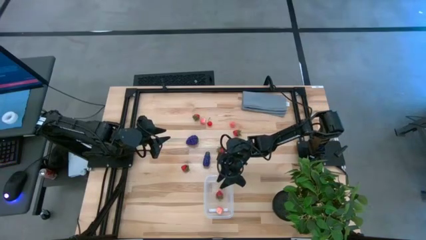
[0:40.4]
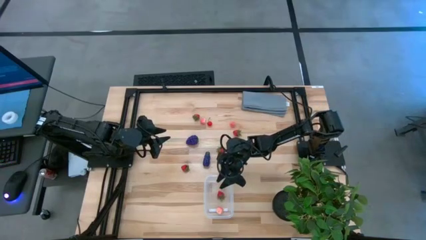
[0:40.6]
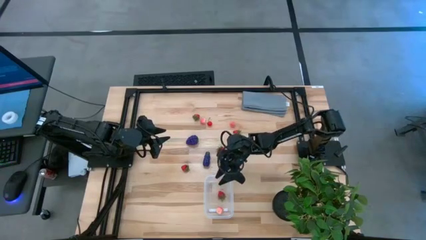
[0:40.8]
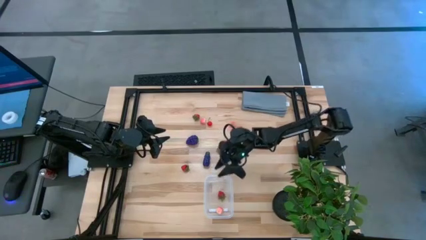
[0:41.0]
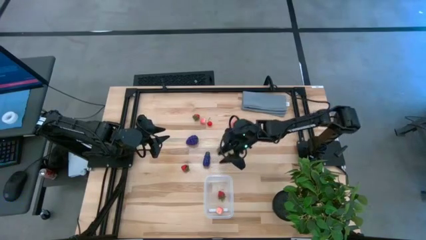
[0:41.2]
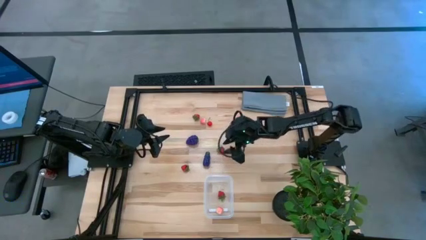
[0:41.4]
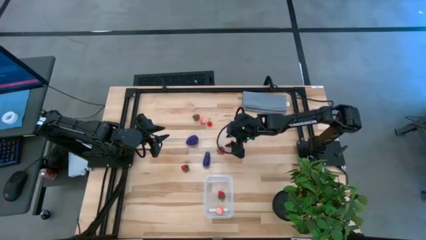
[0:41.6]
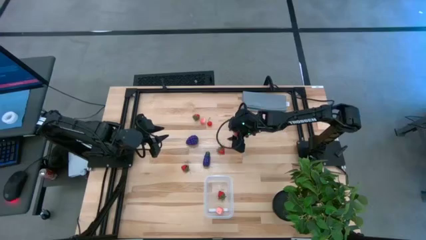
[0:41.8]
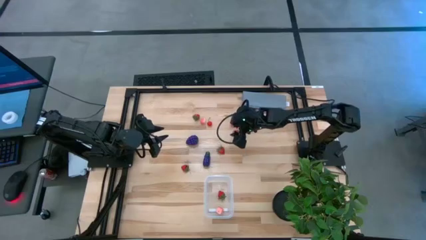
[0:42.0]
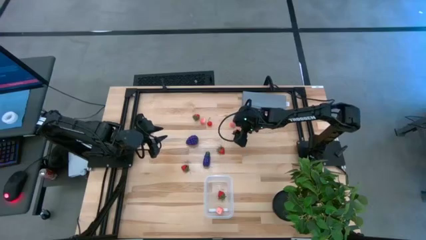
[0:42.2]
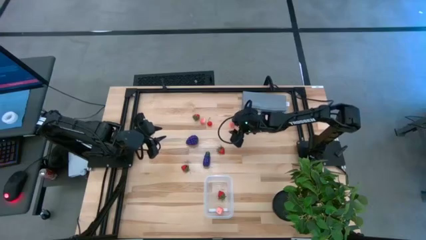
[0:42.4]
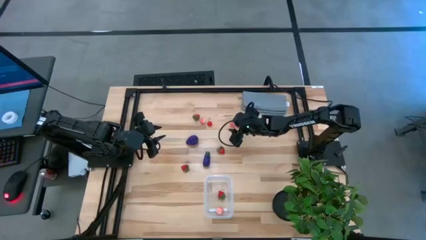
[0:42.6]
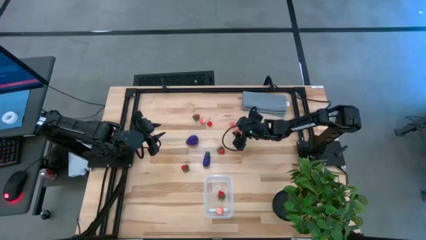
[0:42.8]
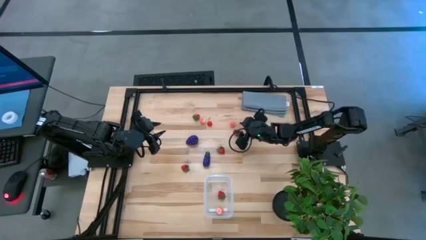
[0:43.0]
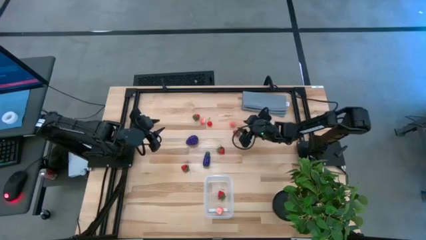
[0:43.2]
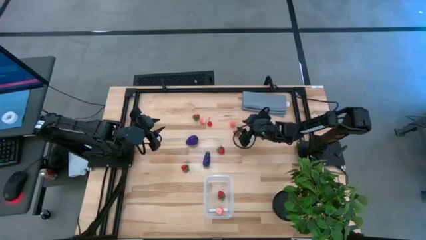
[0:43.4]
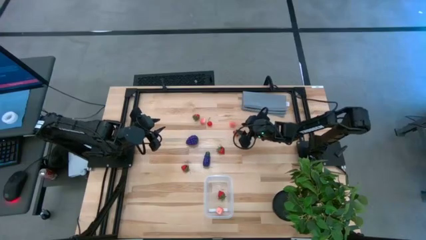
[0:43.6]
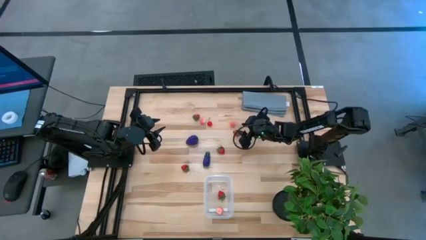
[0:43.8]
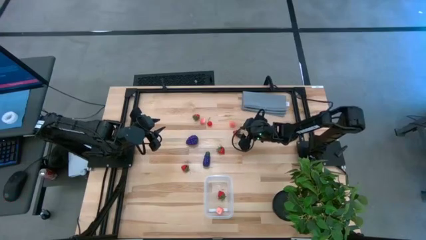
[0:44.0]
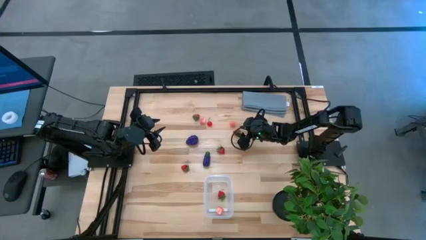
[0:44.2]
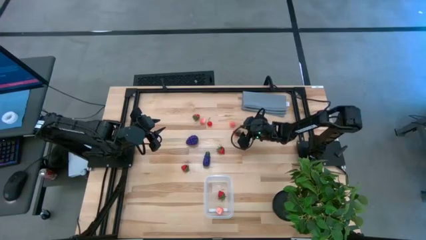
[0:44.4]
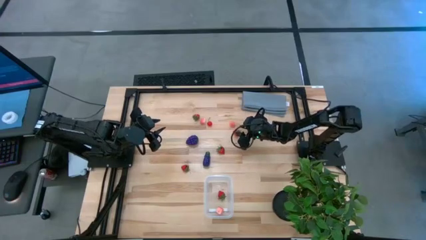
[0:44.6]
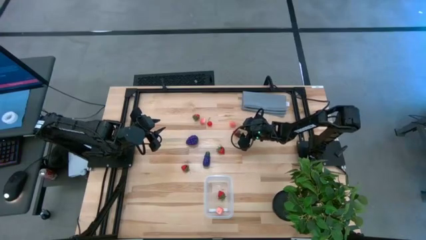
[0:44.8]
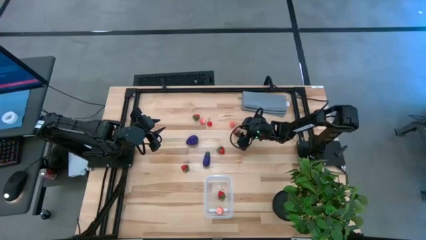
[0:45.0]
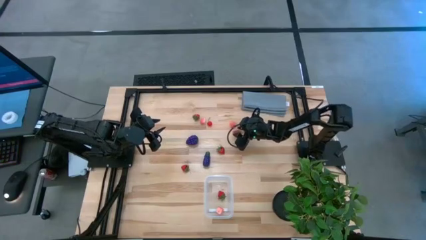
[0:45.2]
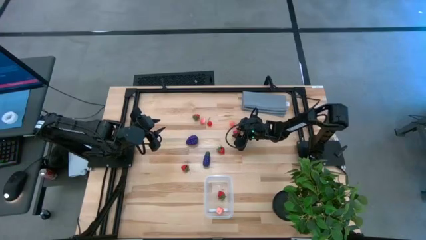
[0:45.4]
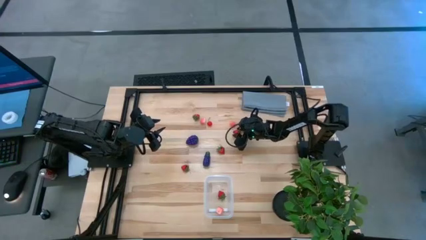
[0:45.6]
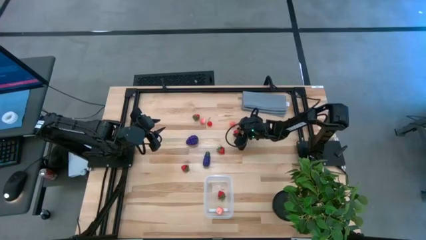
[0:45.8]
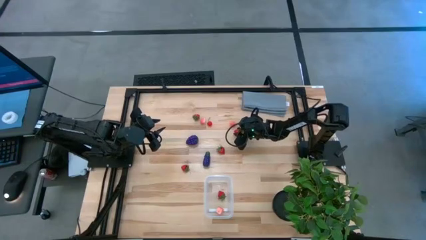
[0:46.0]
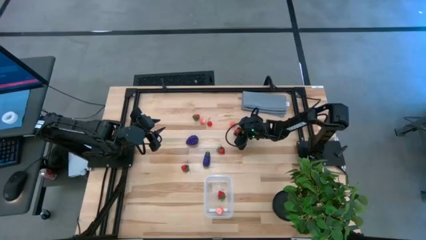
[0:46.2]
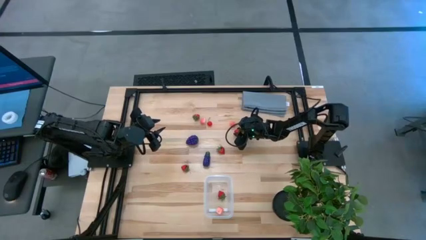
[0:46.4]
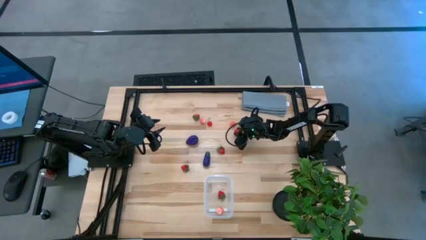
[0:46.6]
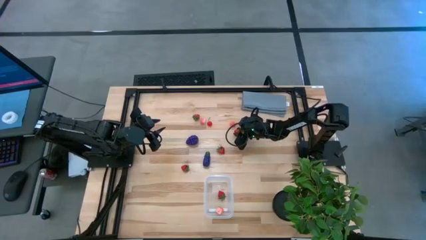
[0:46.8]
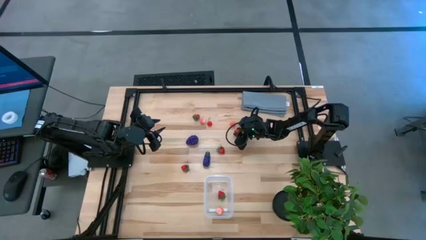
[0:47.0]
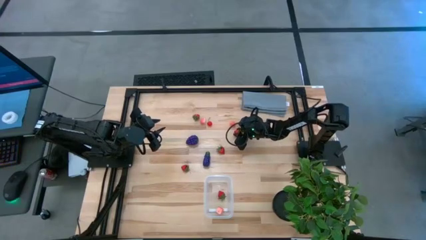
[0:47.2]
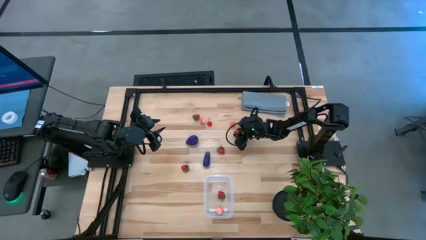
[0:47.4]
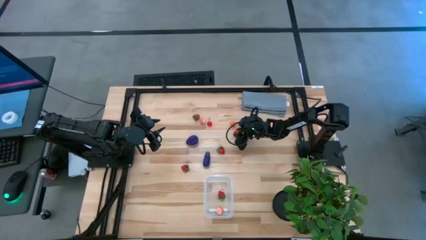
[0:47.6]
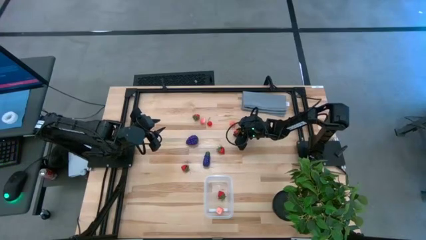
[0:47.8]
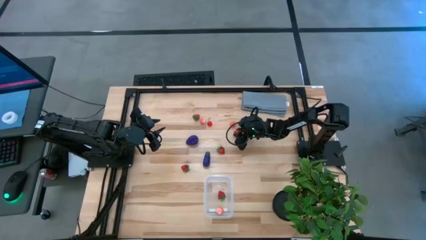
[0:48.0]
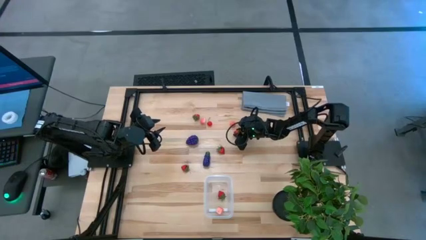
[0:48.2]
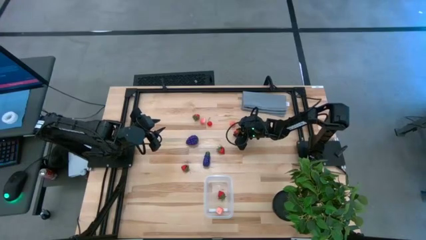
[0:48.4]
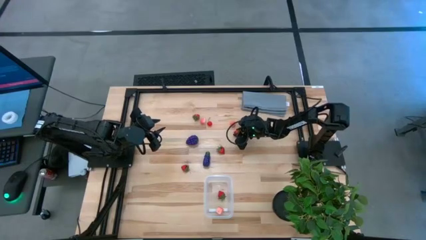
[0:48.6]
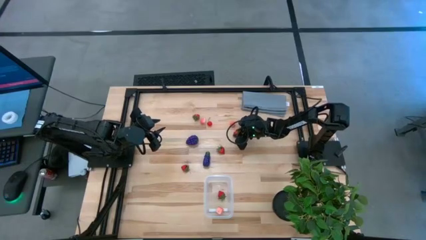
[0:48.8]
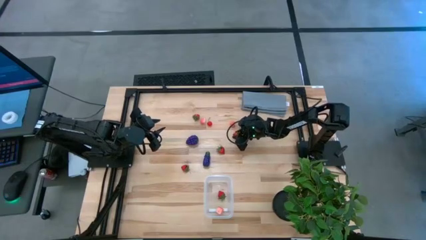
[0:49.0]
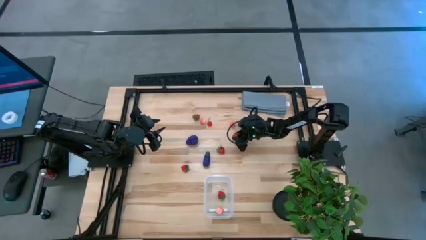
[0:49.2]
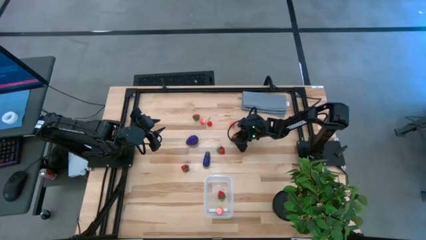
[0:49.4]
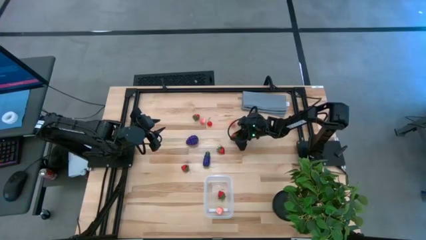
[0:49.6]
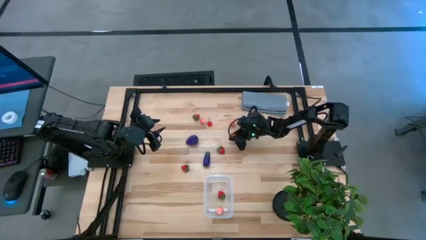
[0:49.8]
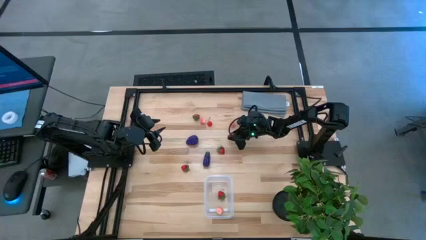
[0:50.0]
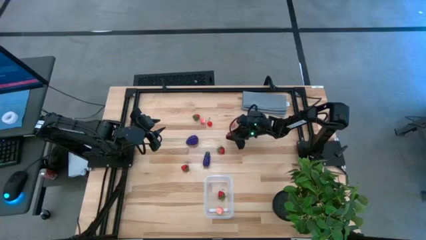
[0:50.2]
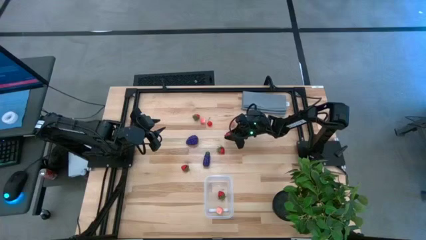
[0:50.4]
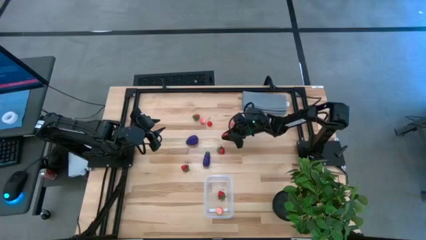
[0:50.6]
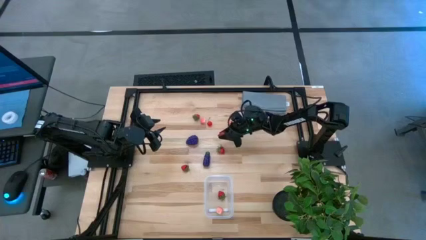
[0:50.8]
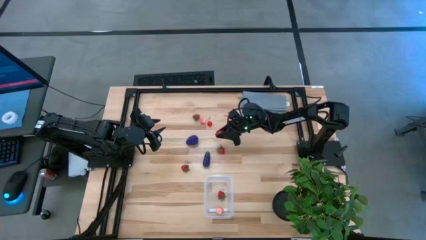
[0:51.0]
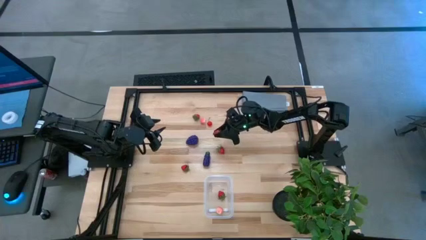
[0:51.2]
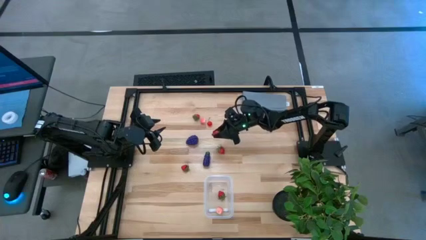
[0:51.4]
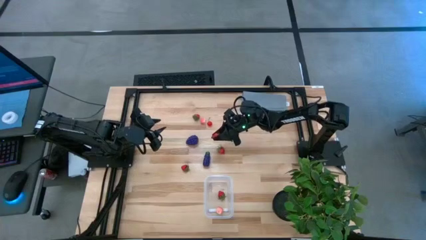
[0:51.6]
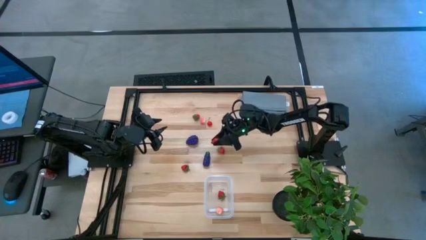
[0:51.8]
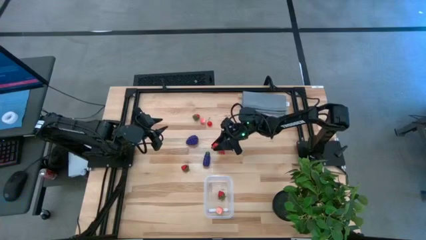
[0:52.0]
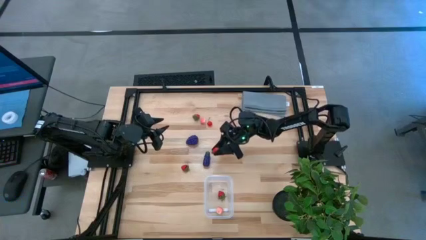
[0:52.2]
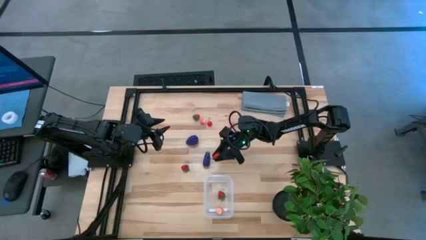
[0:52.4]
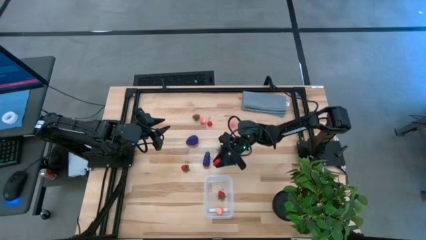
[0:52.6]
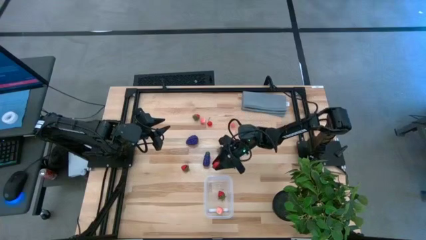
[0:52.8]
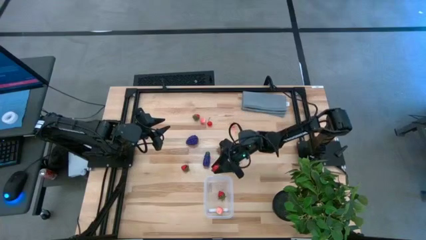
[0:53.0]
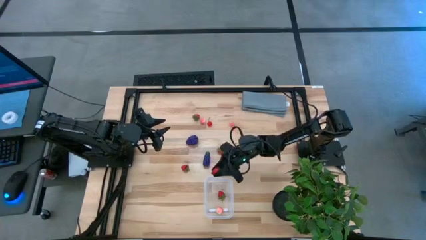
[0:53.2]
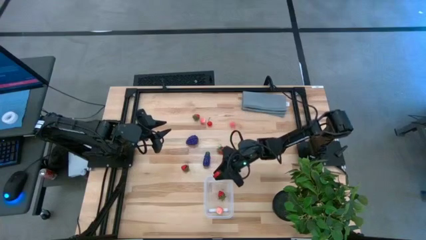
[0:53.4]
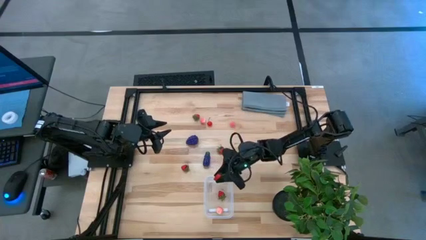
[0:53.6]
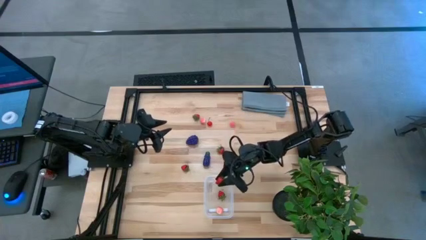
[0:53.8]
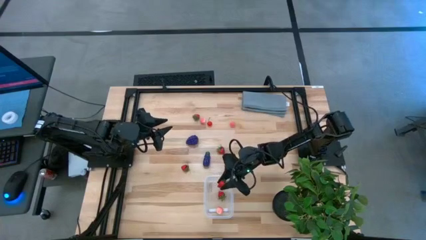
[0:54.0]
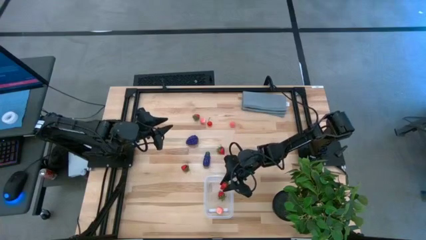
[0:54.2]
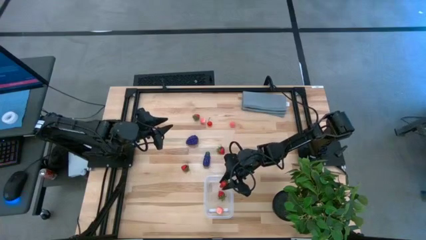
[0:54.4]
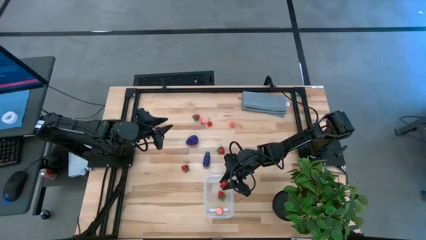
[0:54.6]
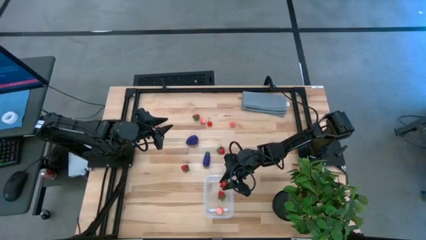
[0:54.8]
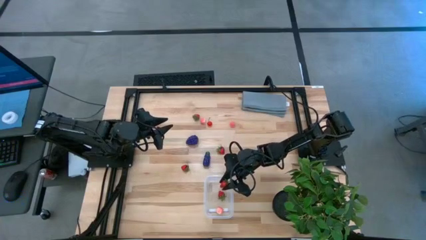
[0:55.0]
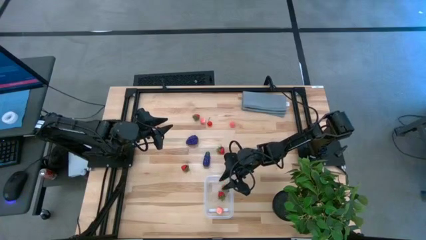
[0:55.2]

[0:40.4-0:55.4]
Task: Pick and placing Produce into tupperware
Put the red strawberry into the transparent bin

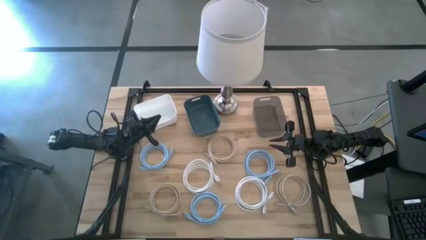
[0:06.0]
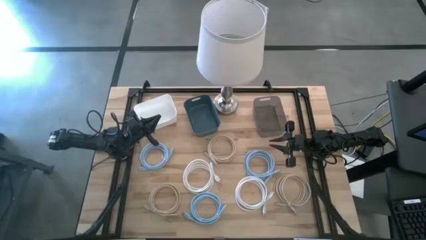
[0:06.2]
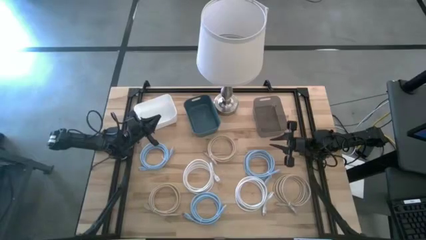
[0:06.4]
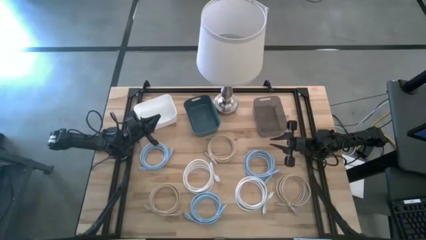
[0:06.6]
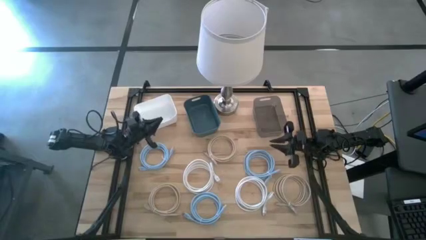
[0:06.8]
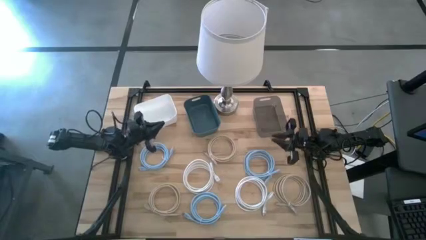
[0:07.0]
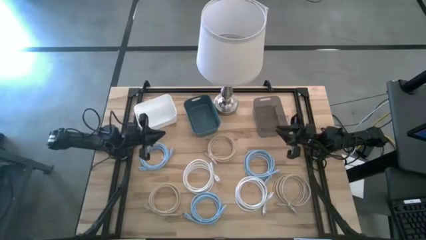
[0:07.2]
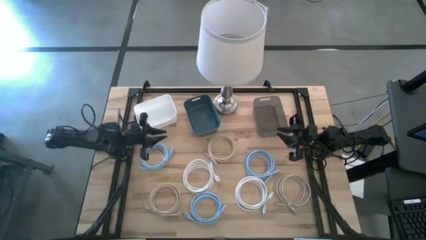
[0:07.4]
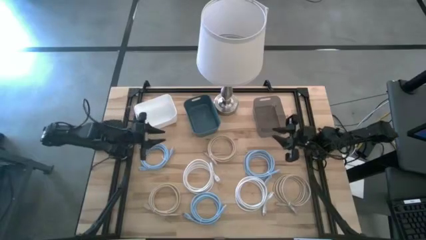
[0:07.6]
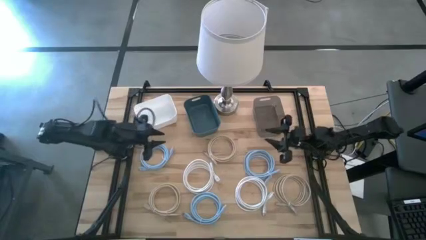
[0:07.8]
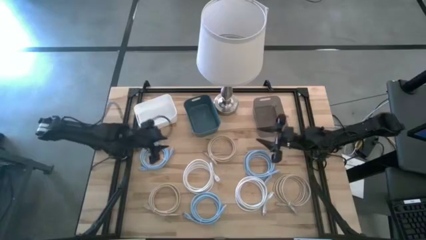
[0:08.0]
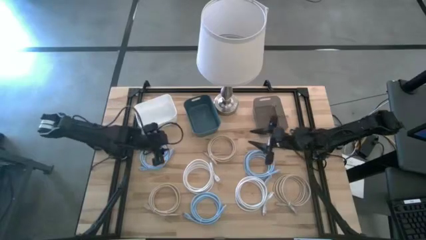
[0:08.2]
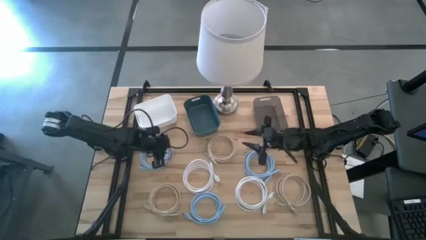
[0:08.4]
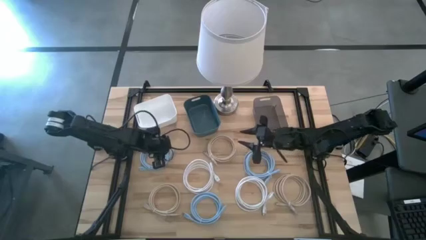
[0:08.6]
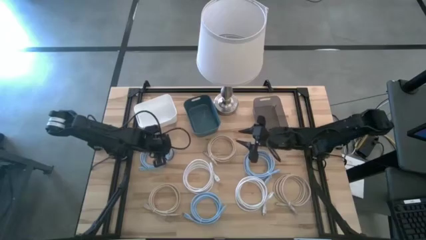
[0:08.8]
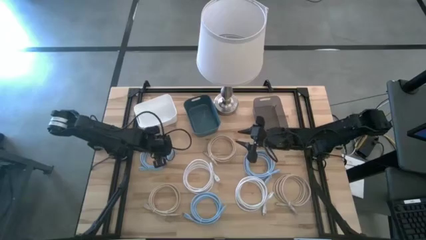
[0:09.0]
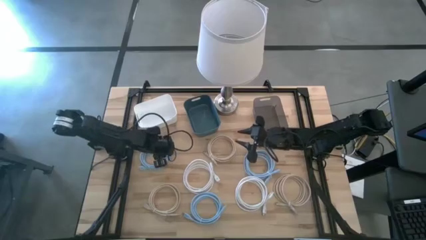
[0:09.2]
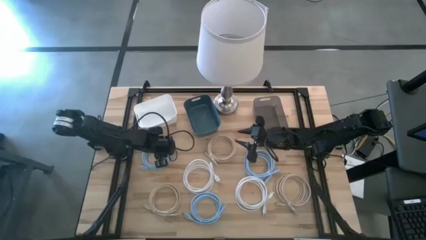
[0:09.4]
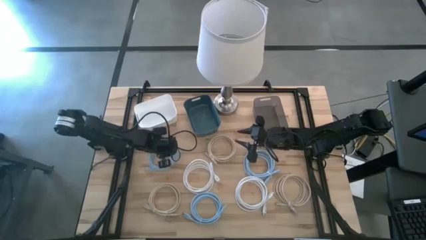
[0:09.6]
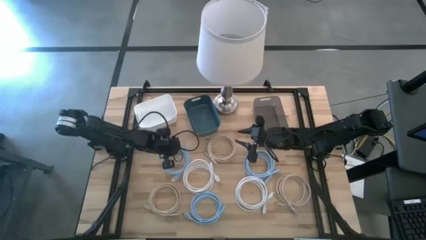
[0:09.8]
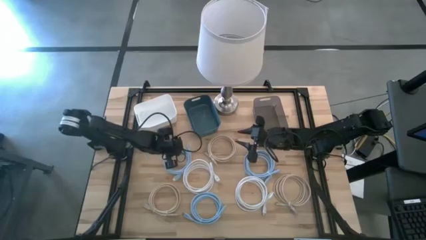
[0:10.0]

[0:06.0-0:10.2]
Task: Pick & Place USB Port
Put the top left blue charger cable into the white bin
